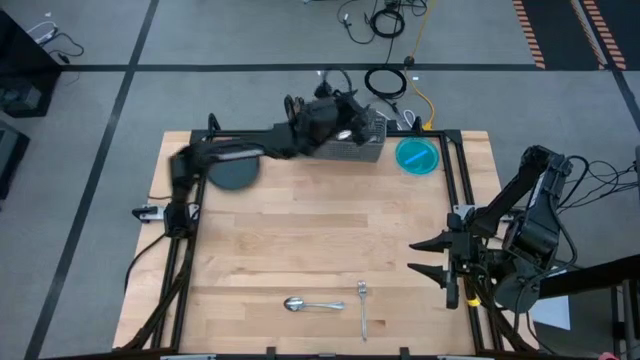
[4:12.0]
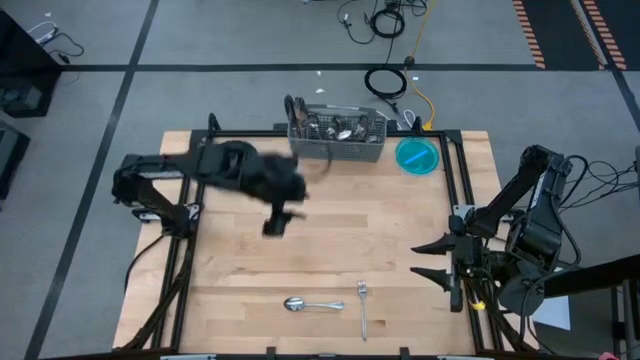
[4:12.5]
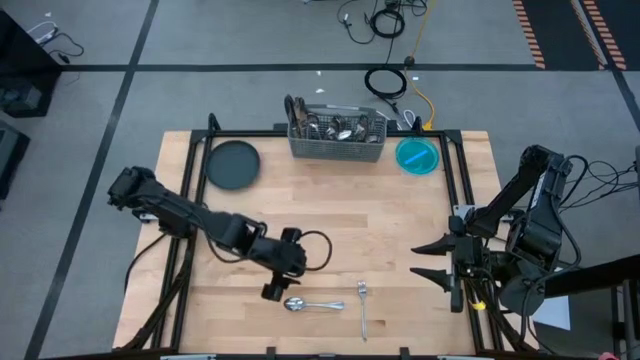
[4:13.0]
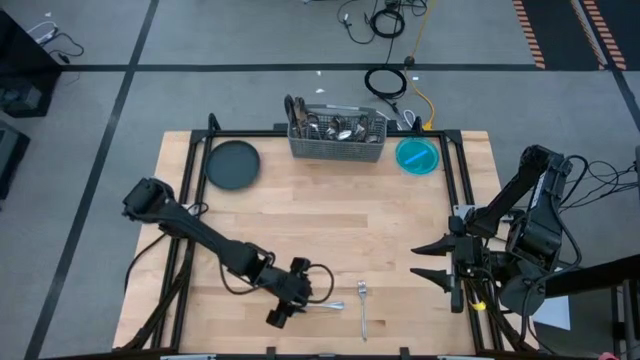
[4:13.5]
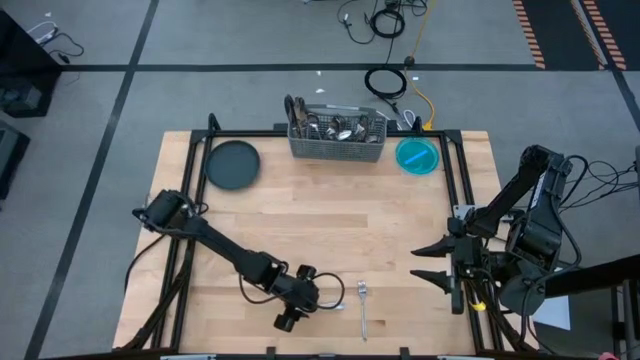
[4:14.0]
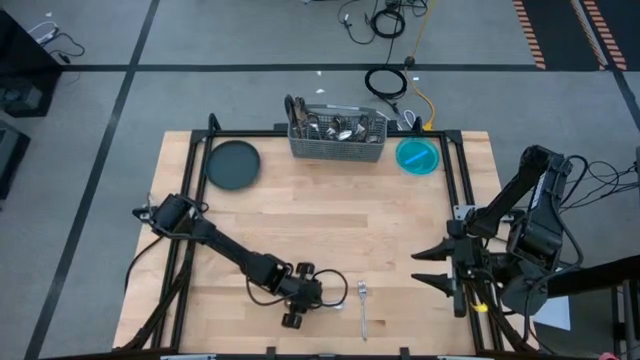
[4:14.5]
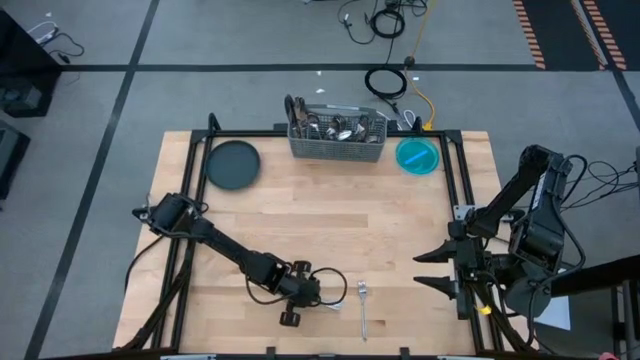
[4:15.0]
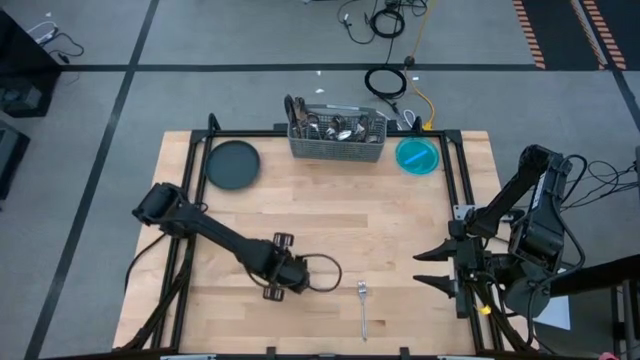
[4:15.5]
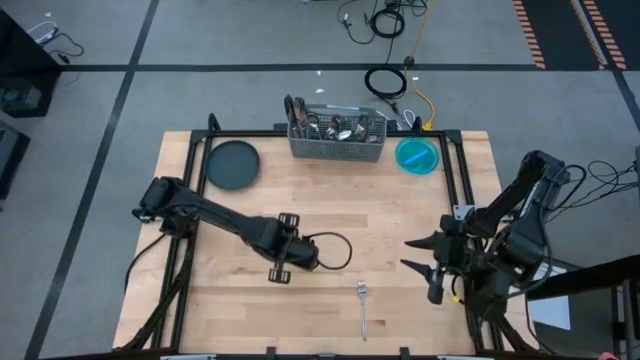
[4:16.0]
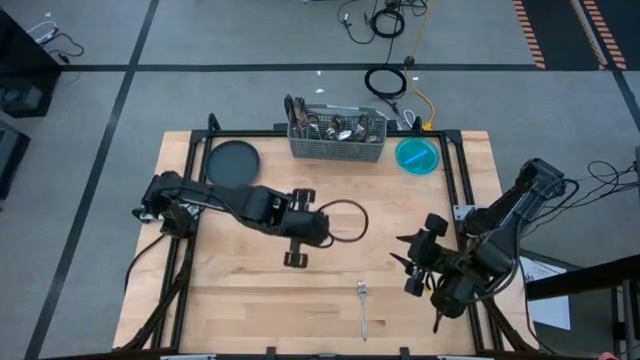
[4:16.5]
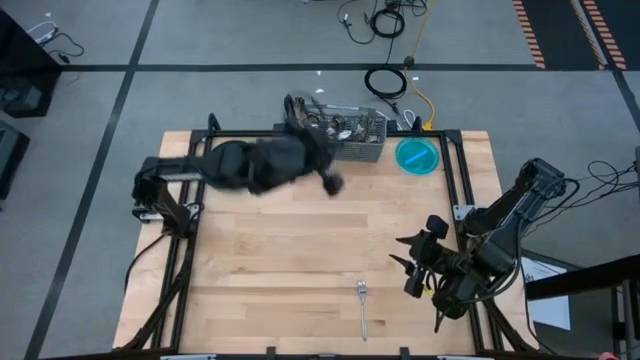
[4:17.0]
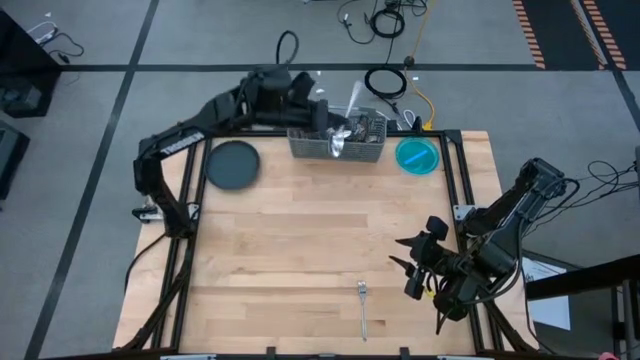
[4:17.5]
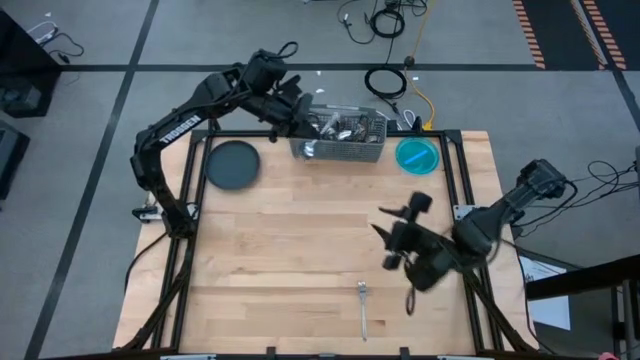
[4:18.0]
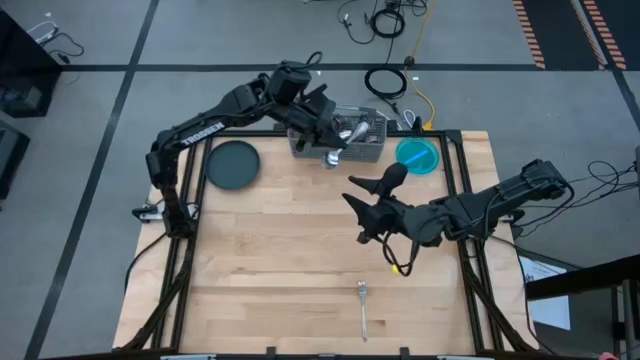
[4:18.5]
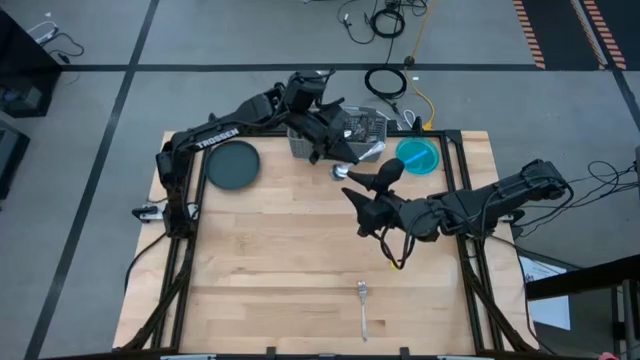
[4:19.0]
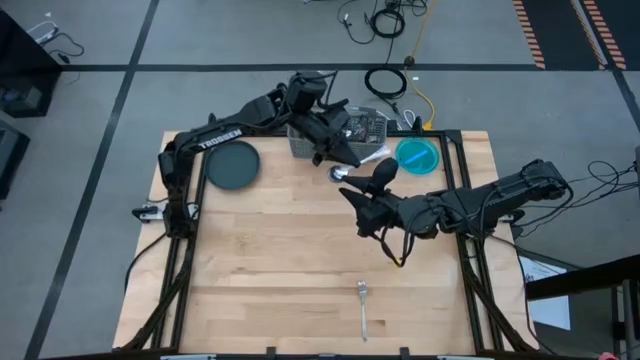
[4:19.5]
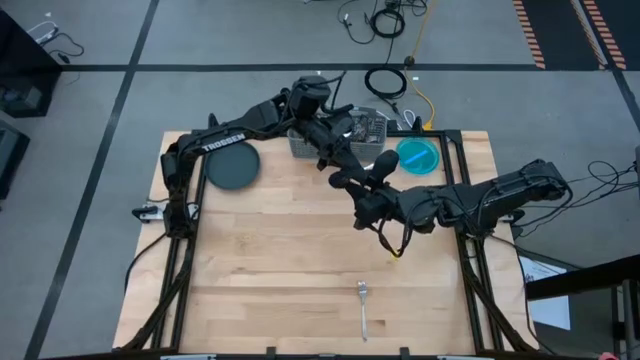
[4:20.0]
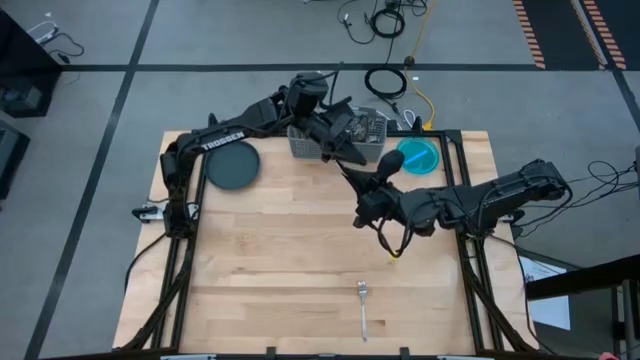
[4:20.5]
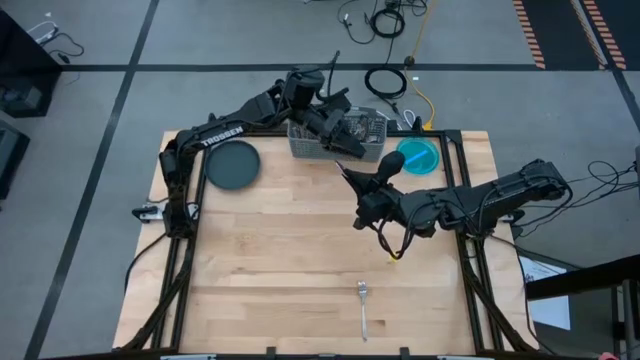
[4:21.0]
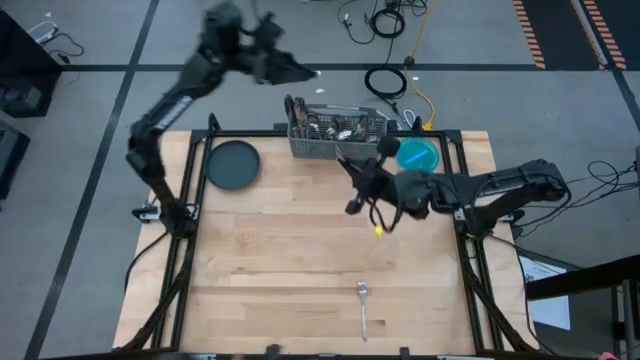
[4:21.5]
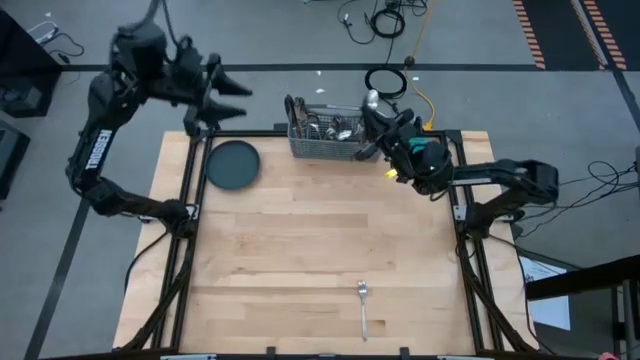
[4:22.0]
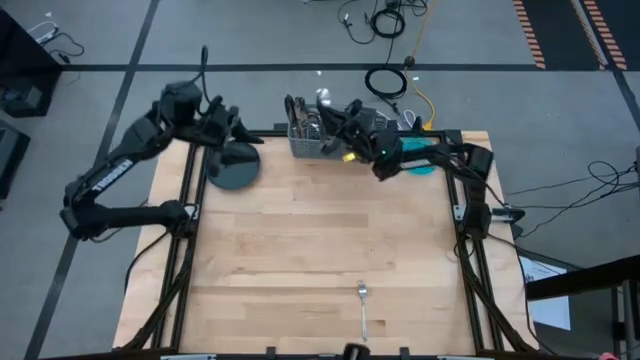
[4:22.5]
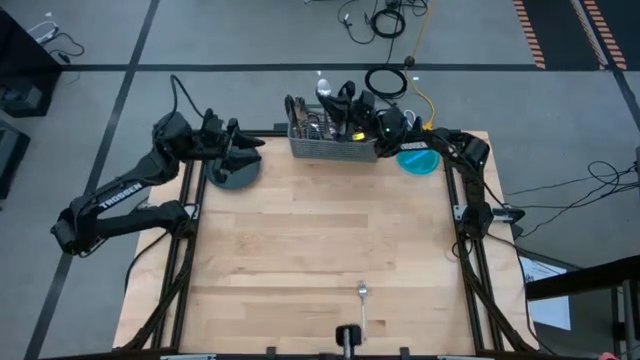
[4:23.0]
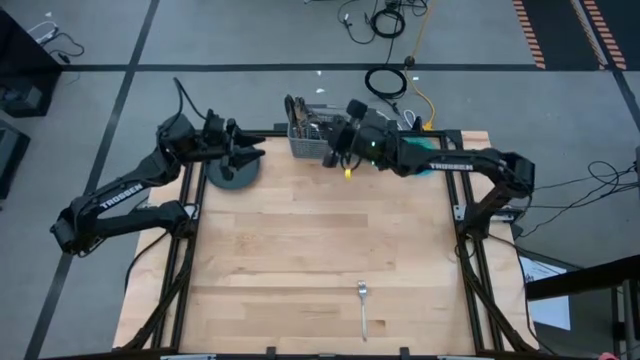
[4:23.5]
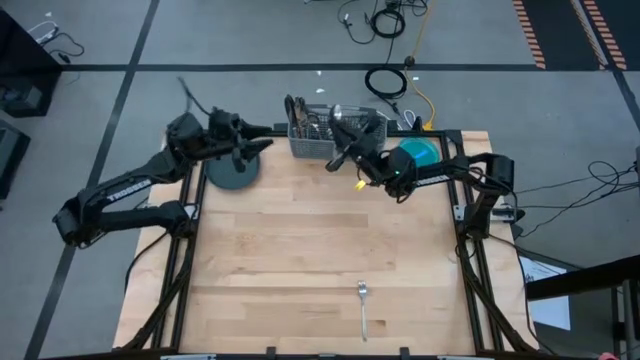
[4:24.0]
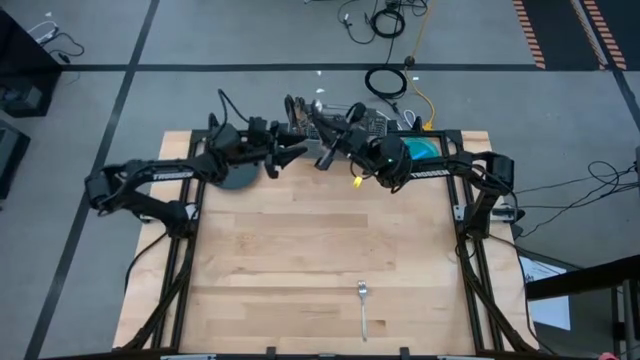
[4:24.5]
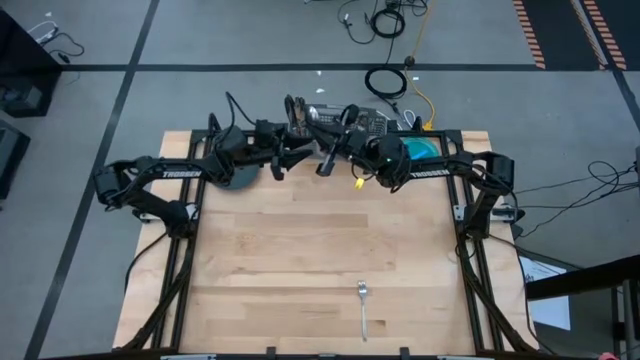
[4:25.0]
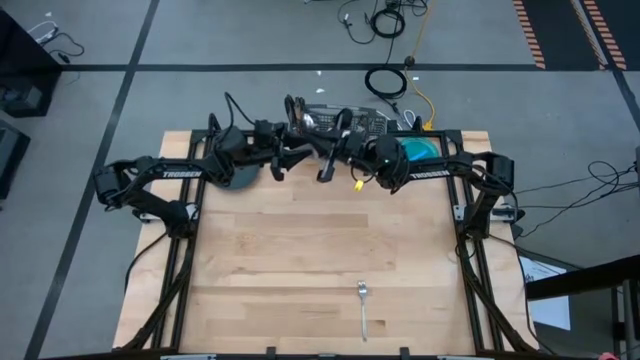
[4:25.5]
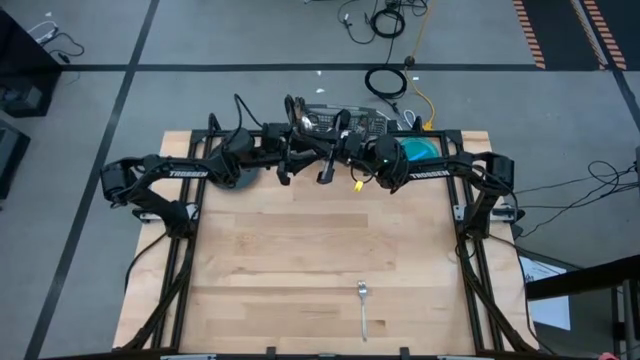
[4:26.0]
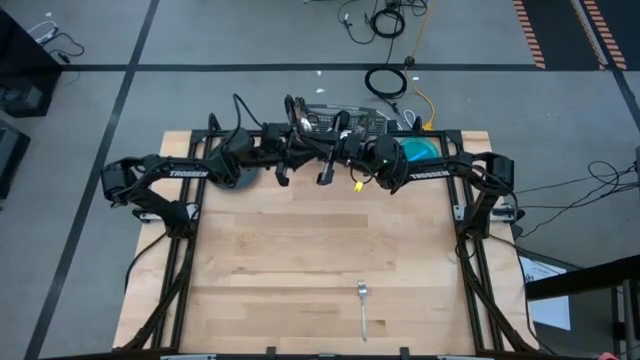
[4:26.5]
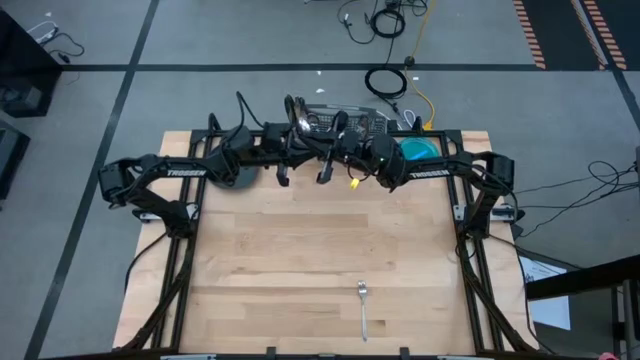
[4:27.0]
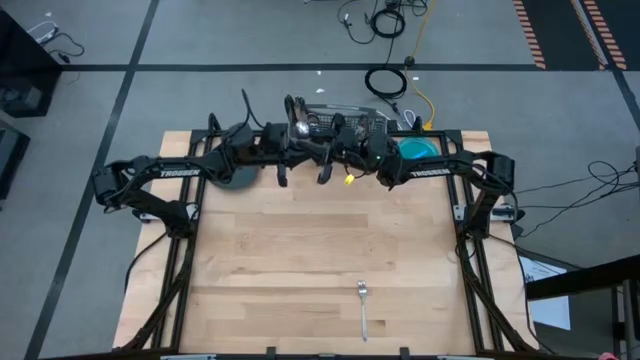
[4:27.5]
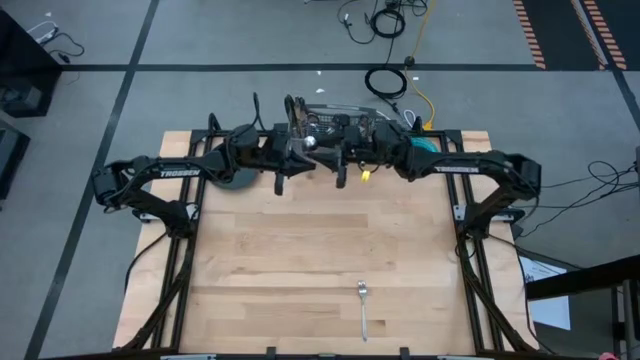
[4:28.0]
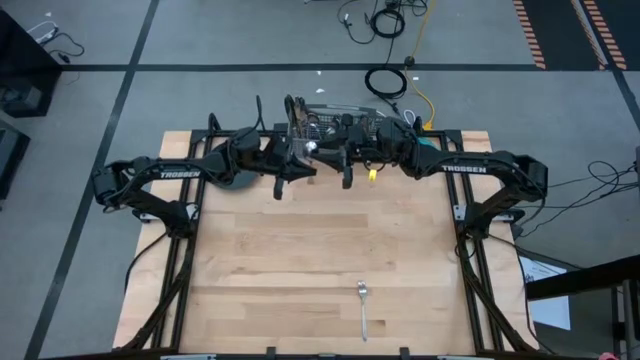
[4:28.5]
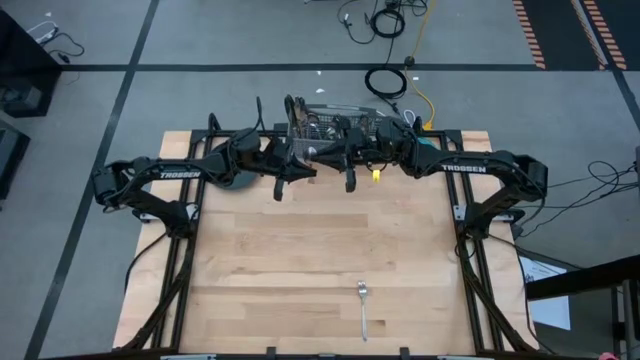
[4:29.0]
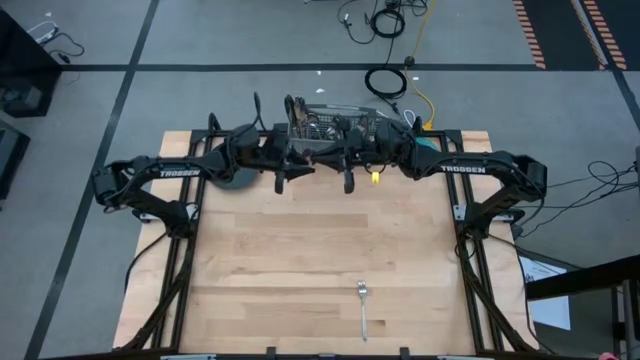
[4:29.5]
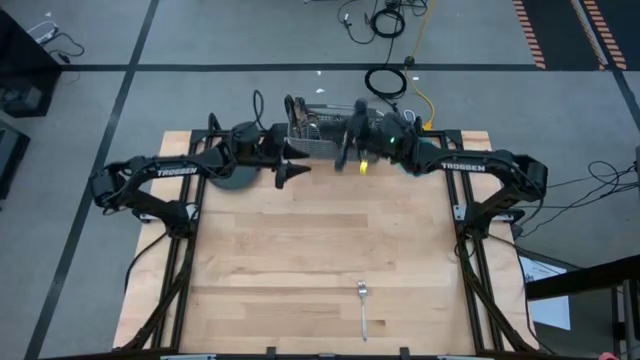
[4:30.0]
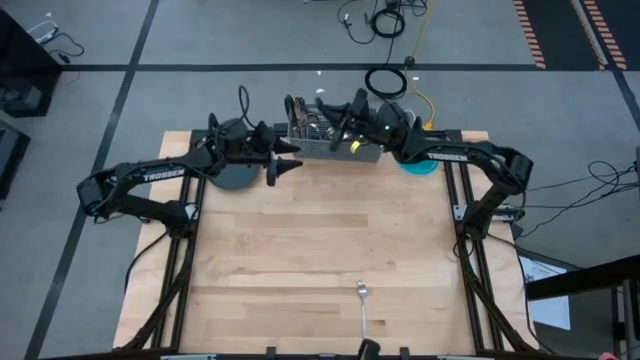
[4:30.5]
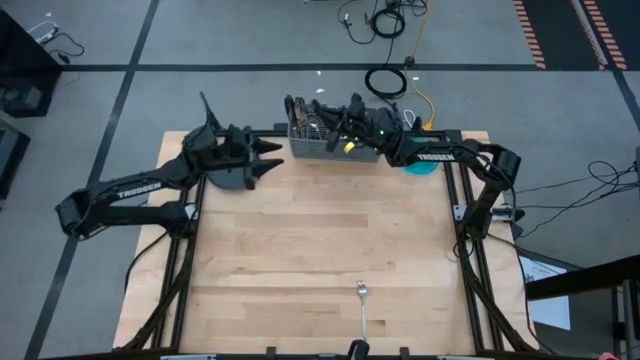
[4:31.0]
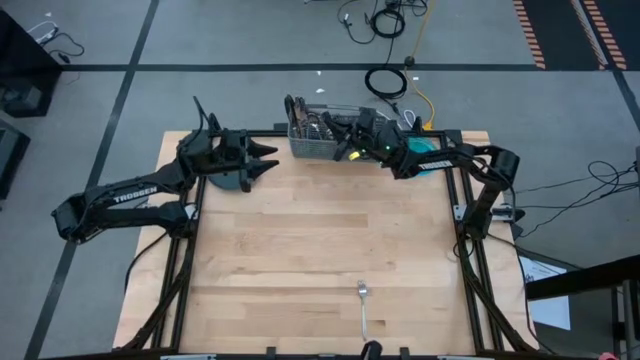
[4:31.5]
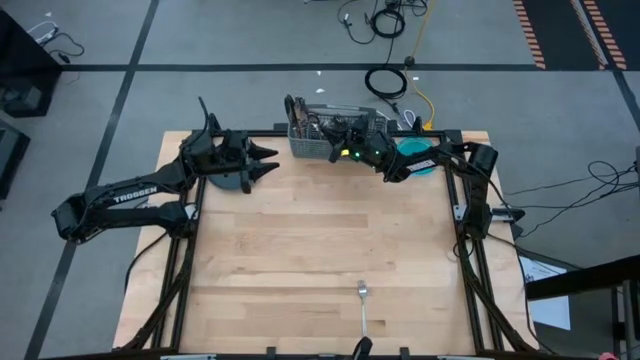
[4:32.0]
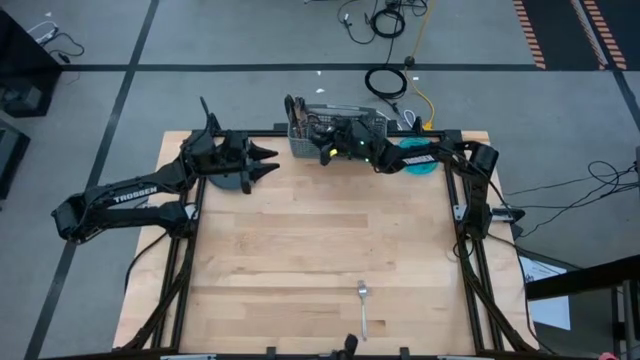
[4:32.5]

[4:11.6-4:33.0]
Task: Sort silverware
Put the spoon into the silverware organizer
